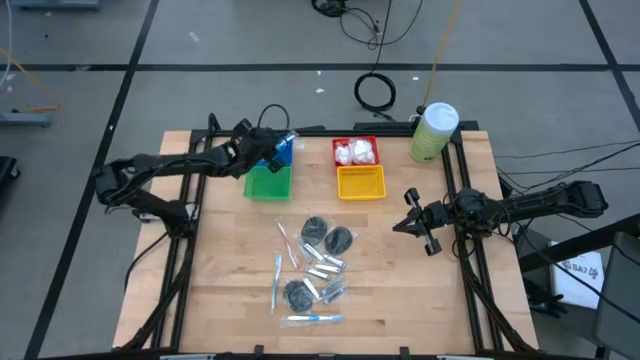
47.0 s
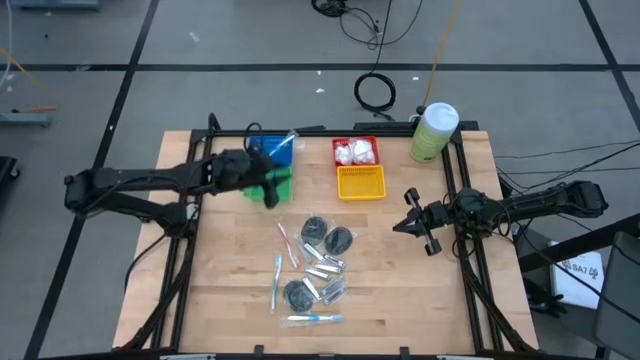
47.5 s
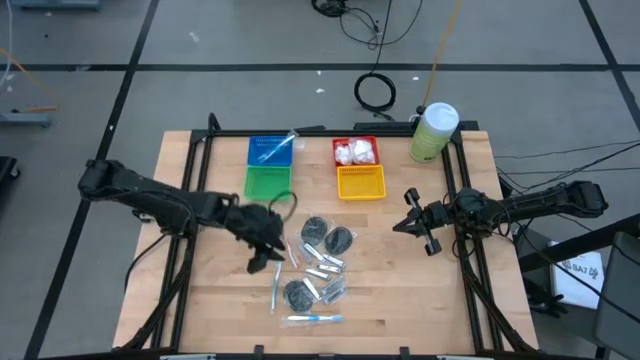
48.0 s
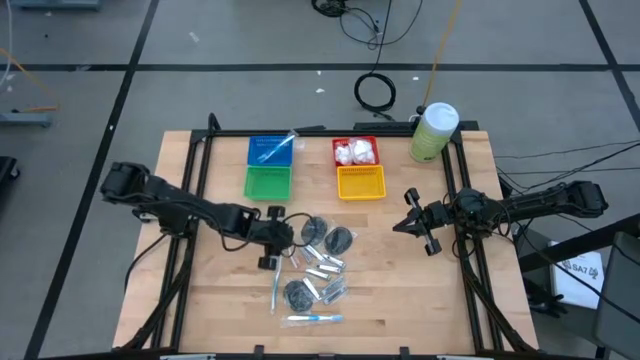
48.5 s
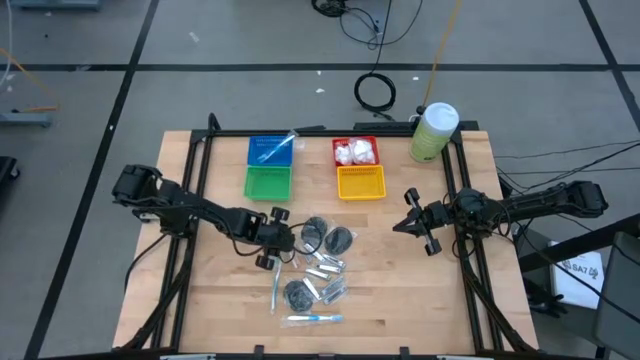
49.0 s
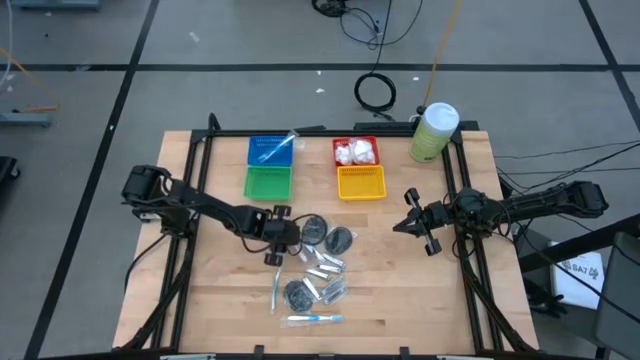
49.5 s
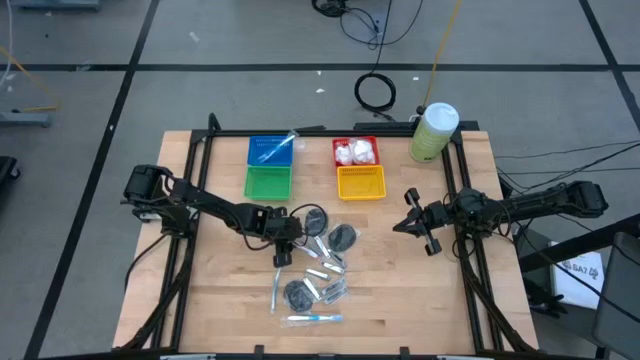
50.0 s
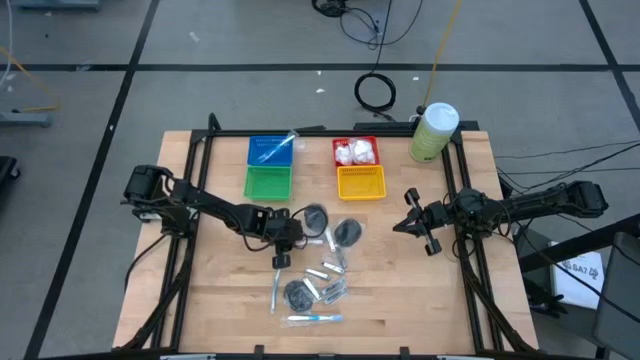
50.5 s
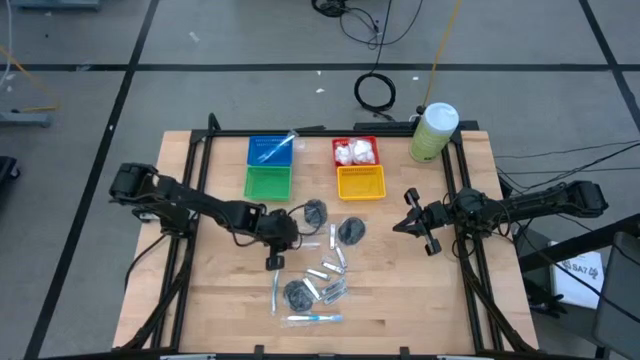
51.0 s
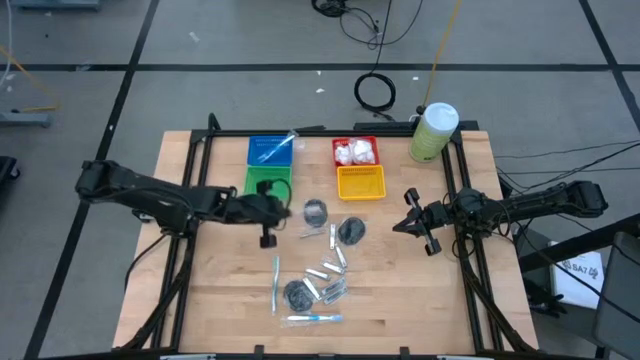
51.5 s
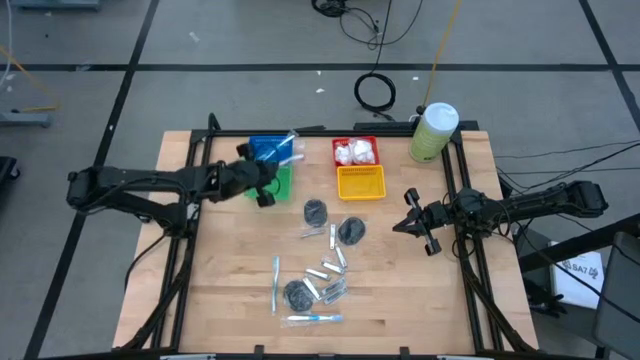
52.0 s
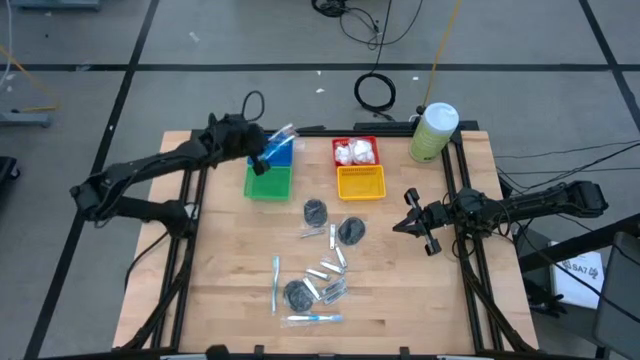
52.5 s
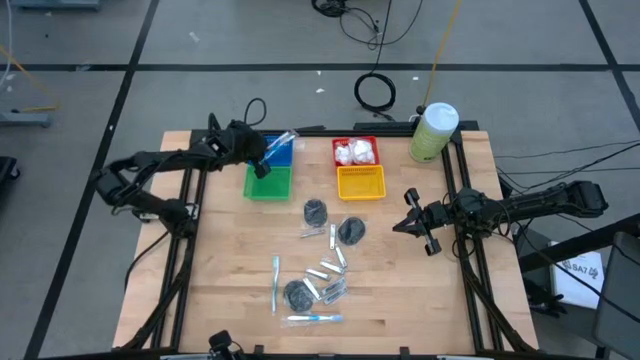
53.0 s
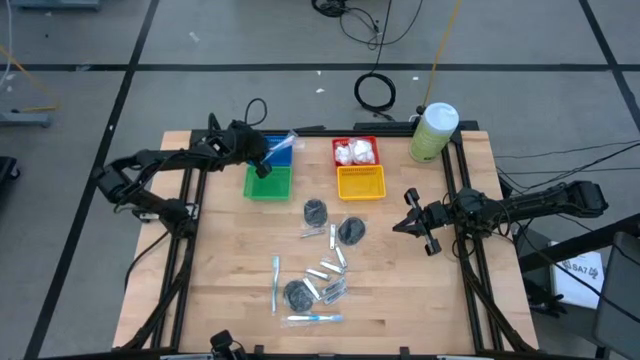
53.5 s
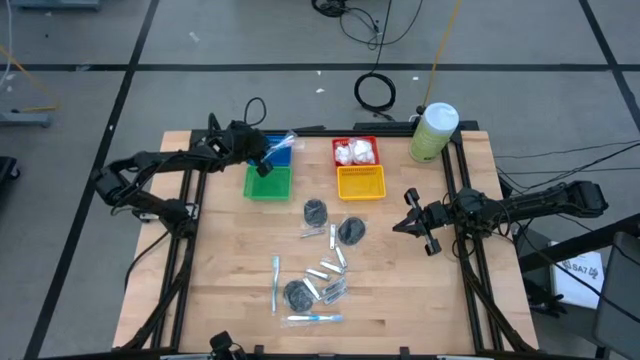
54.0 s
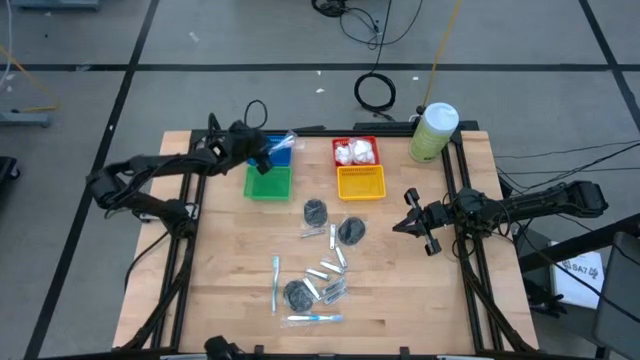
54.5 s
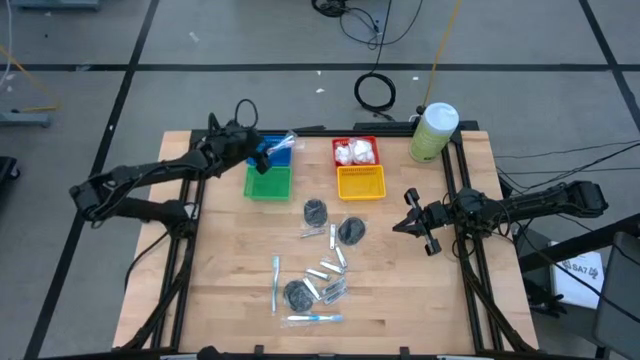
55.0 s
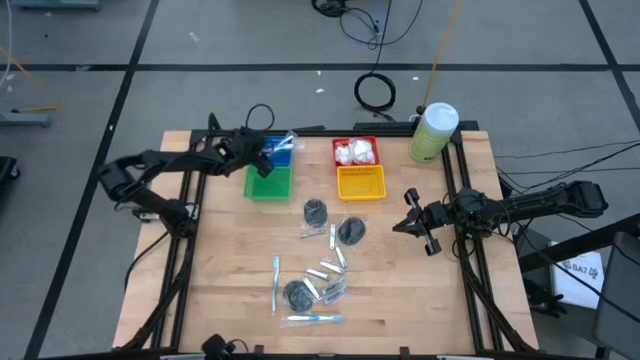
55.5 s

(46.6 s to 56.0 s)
Task: Pick & Place Travel size toiletries
Put the red toothbrush into the blue bin

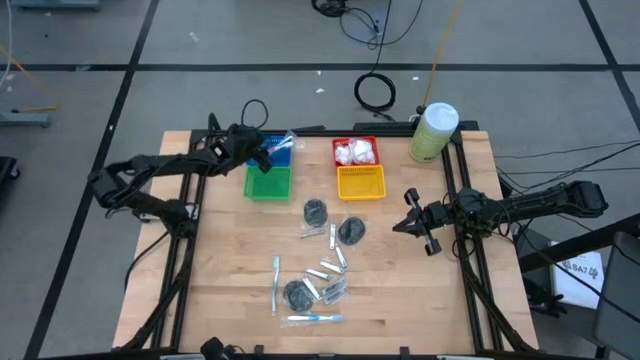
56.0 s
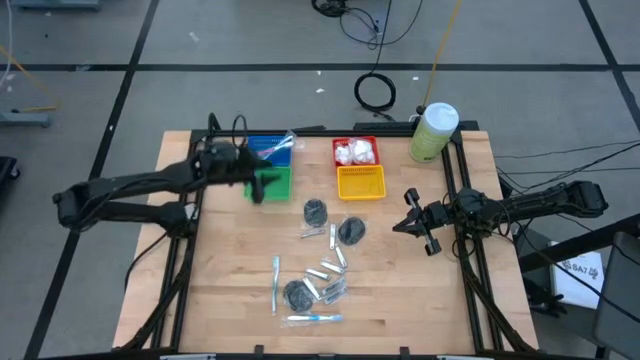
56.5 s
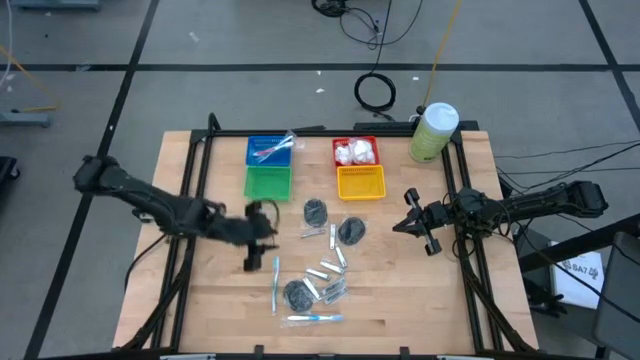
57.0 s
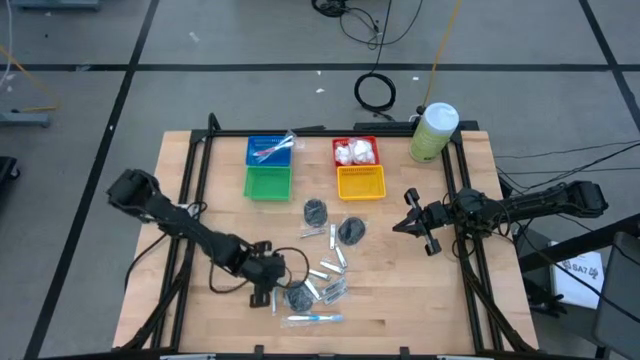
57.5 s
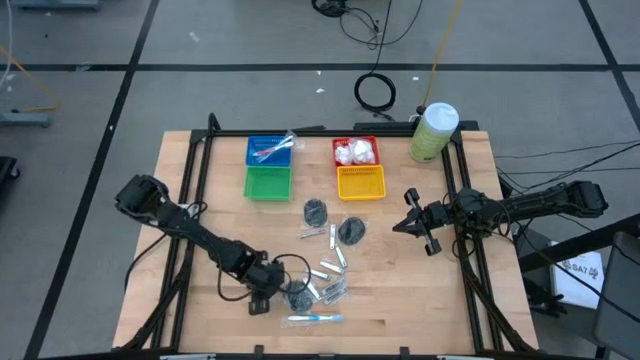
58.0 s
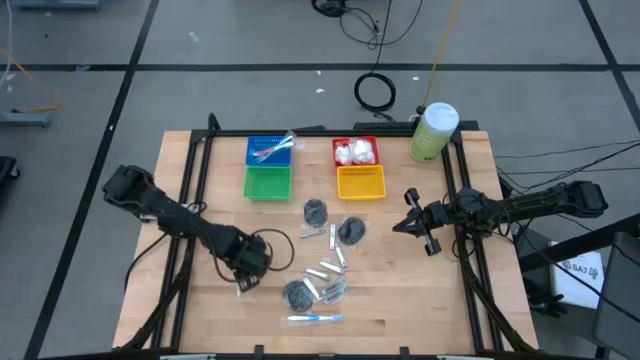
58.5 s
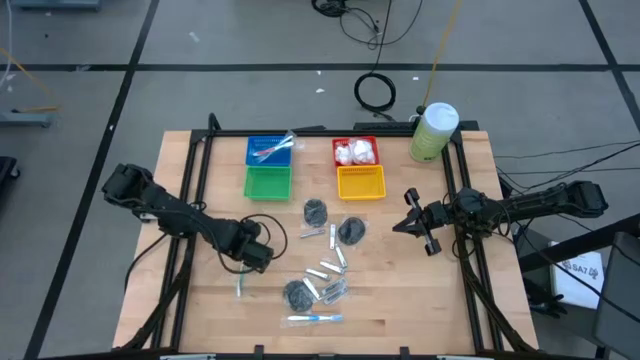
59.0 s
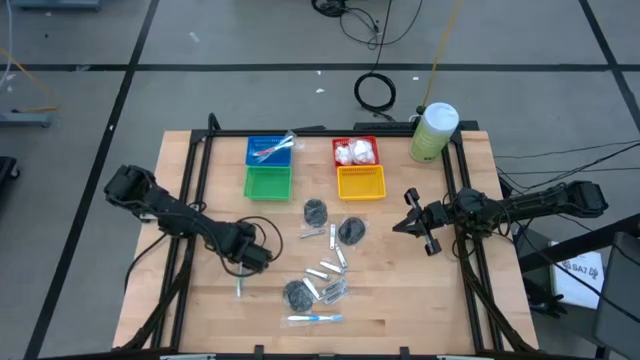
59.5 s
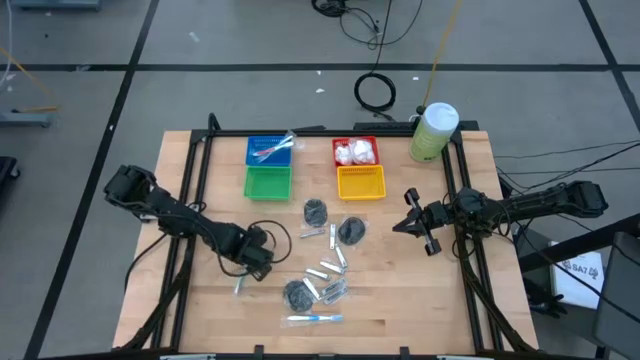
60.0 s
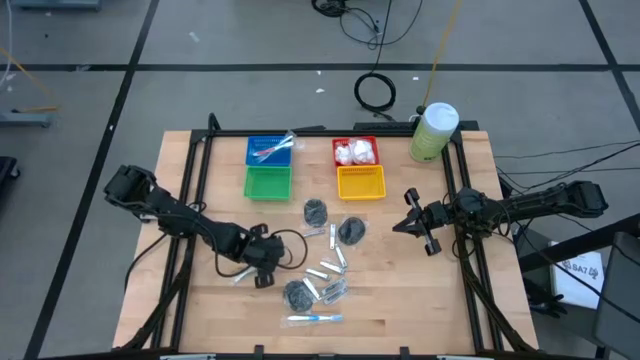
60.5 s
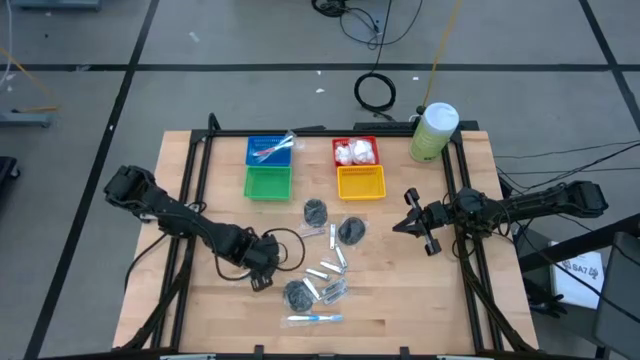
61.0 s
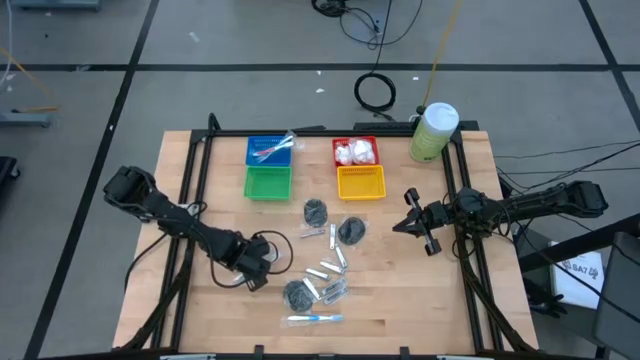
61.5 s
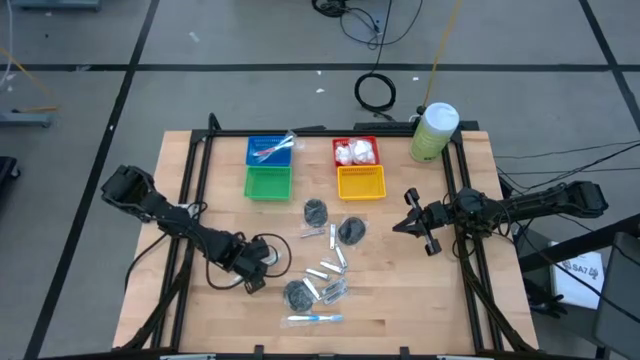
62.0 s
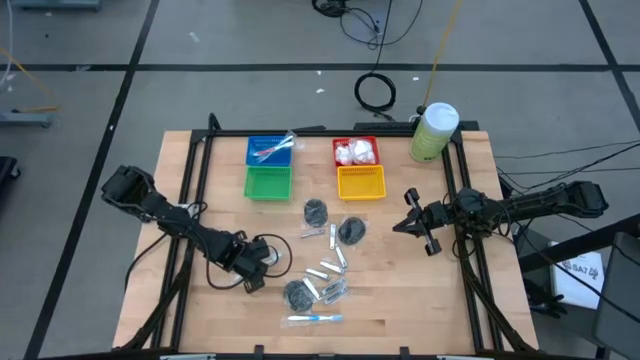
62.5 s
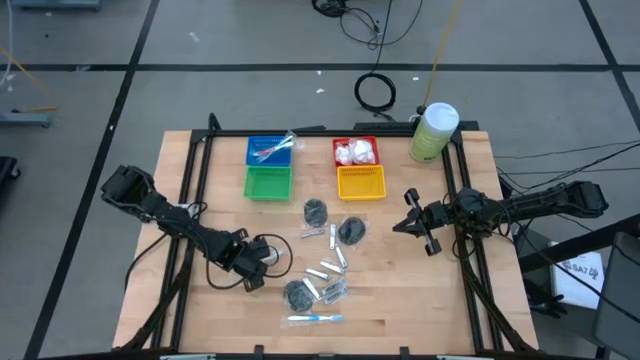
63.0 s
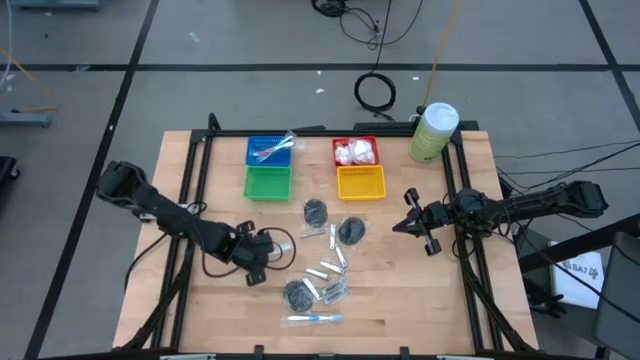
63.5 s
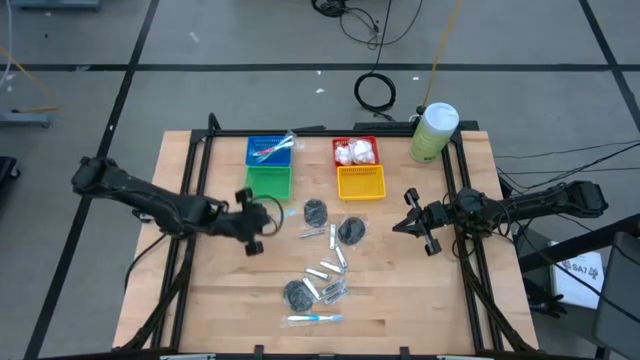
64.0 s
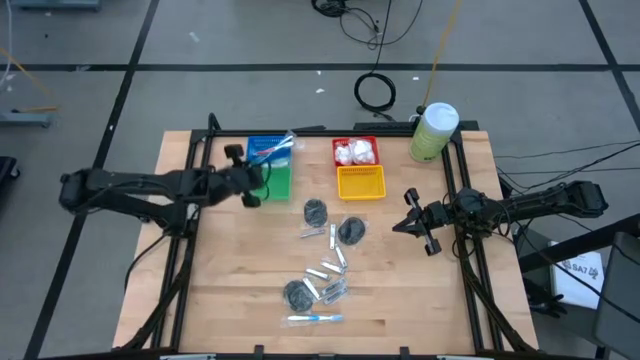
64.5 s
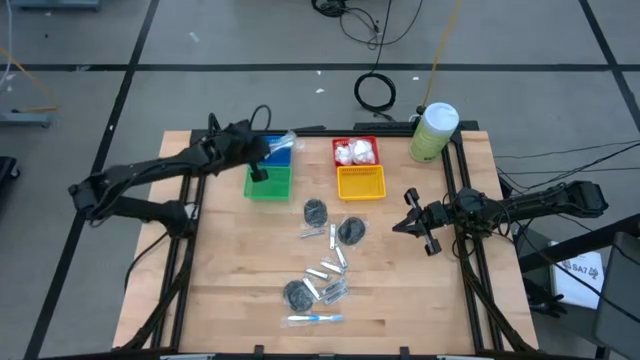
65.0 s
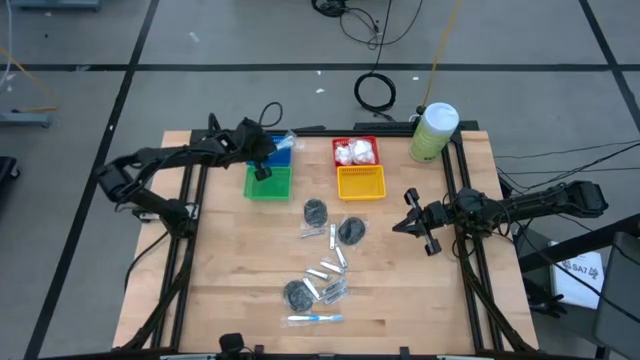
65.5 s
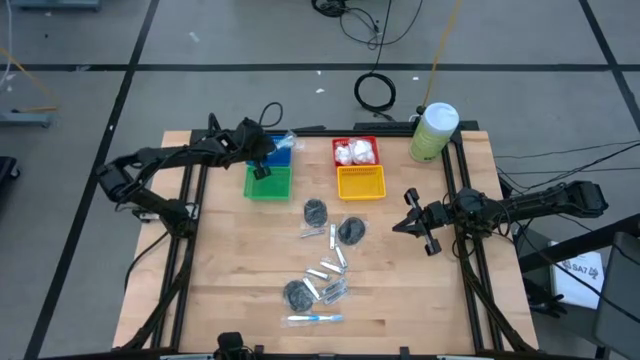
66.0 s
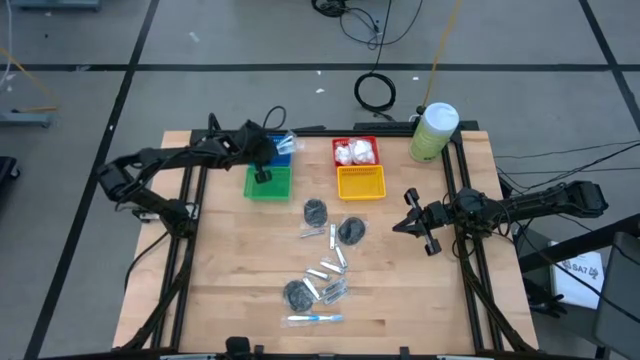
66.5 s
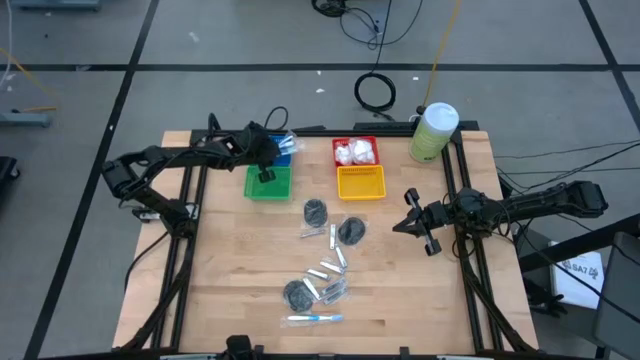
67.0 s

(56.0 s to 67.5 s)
Put the green toothbrush into the blue bin
